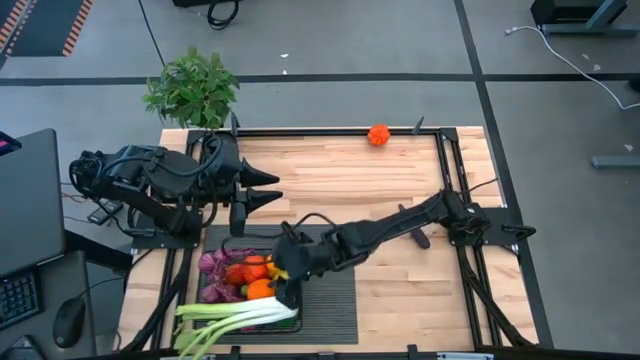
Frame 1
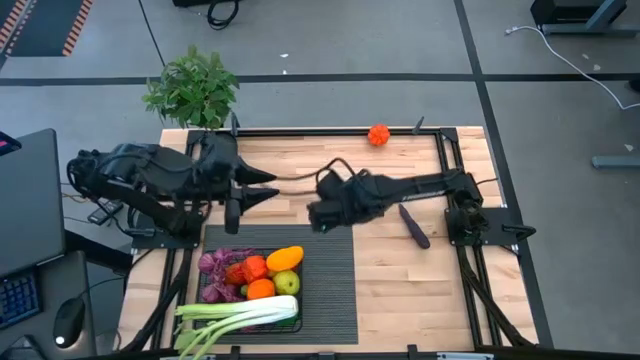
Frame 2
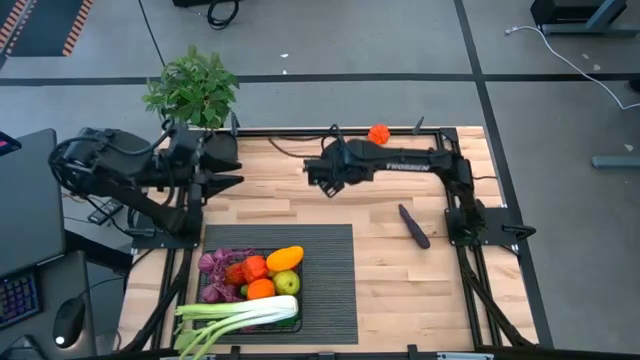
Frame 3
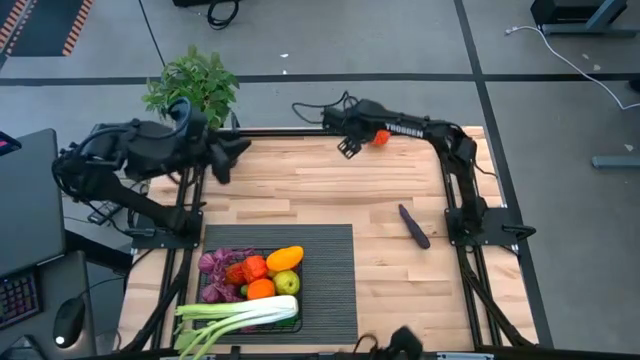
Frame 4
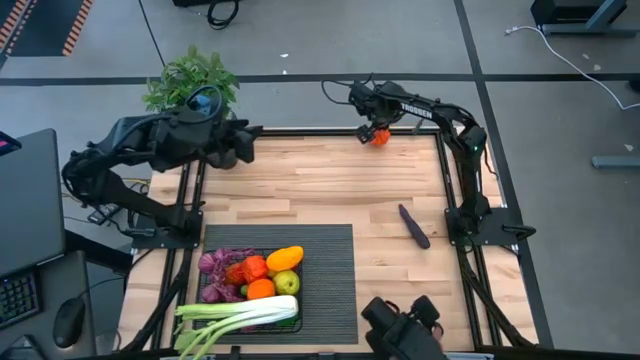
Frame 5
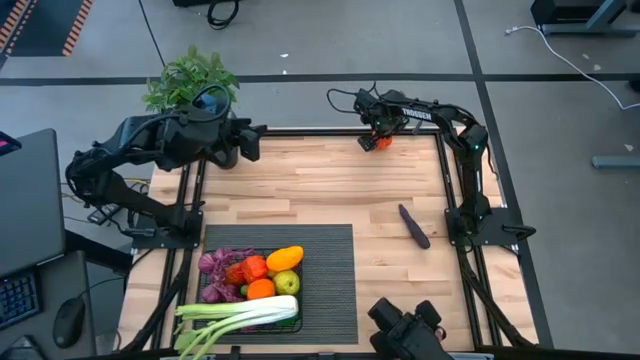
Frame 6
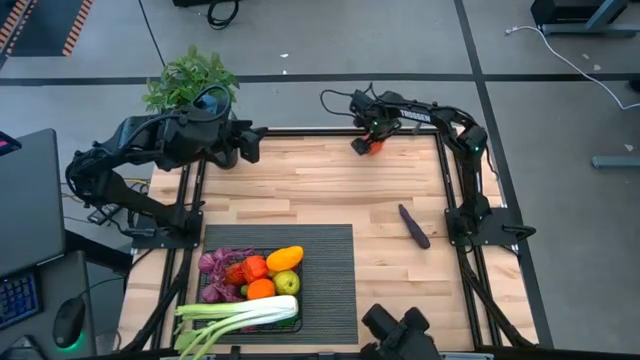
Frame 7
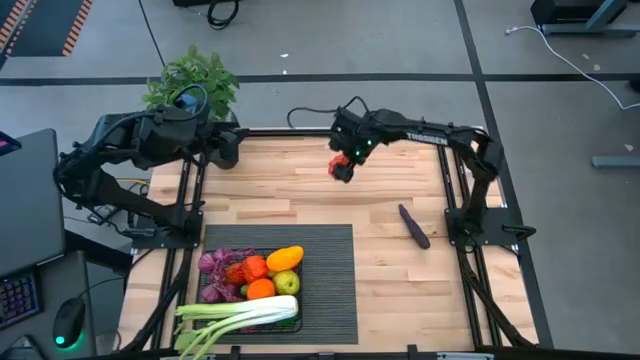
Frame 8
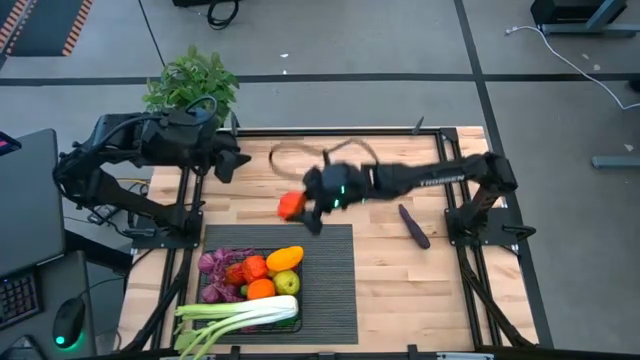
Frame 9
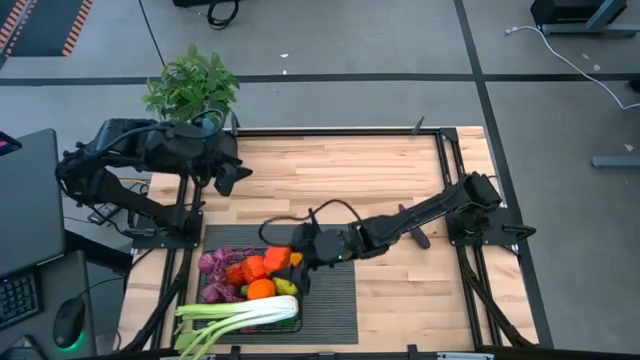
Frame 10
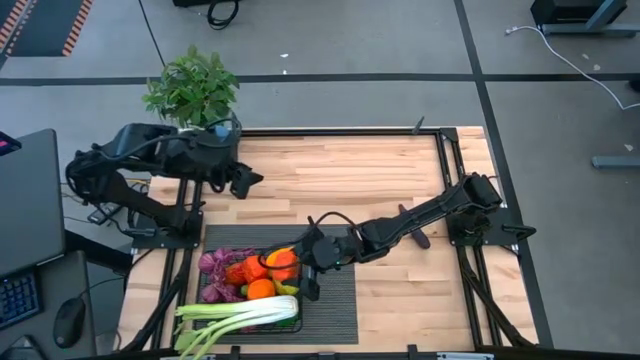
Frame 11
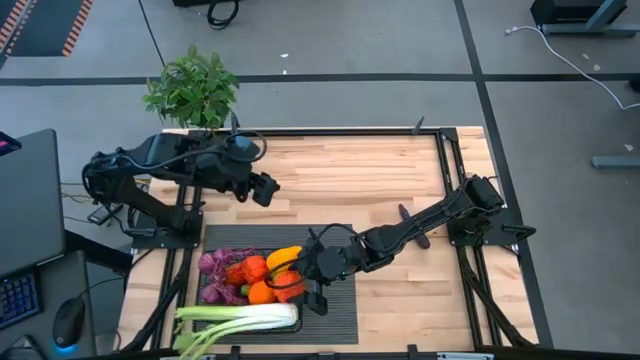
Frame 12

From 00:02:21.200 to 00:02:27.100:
Task: Build produce basket
Put the orange pumpkin into the wire basket

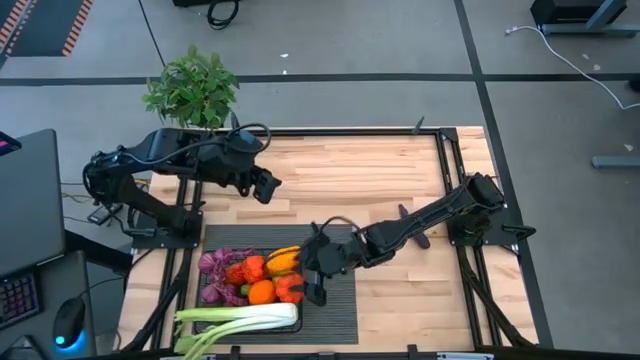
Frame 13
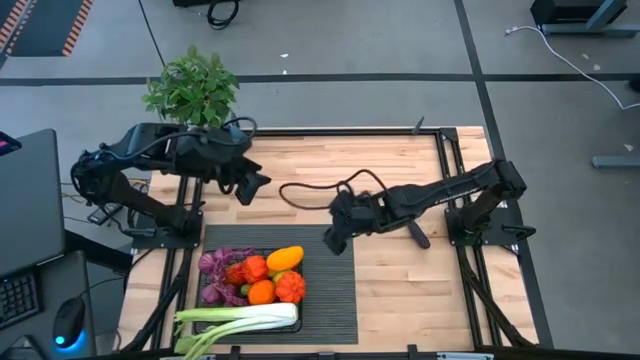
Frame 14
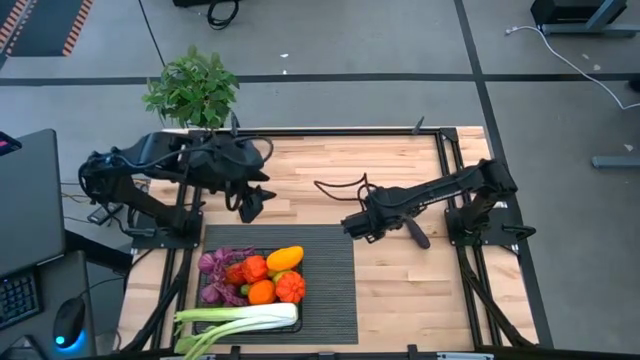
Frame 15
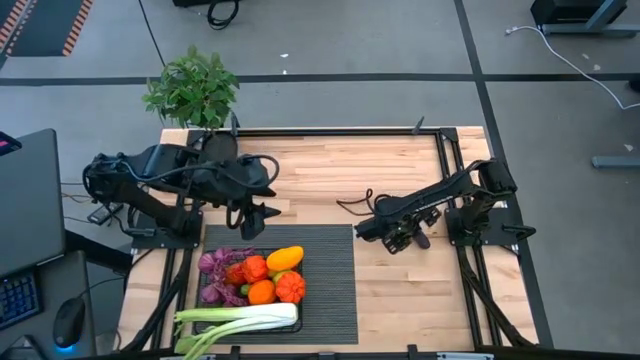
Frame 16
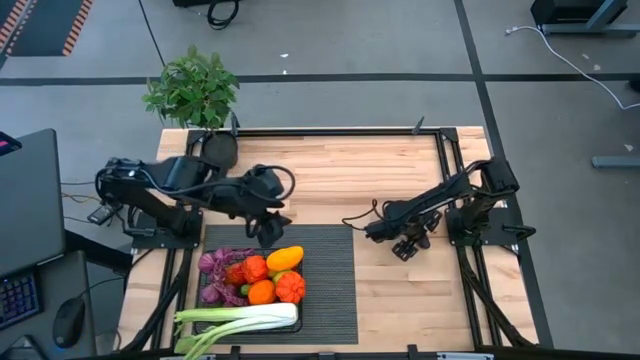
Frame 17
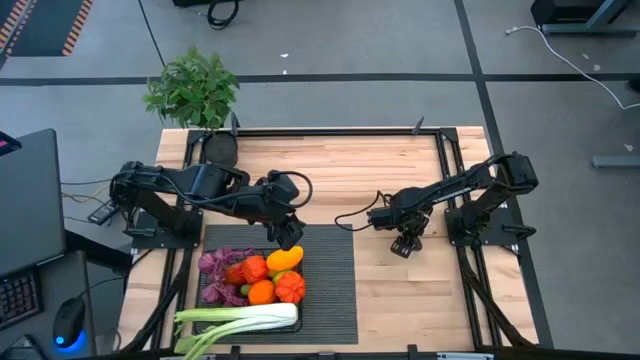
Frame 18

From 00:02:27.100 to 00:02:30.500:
Put the purple eggplant into the wire basket

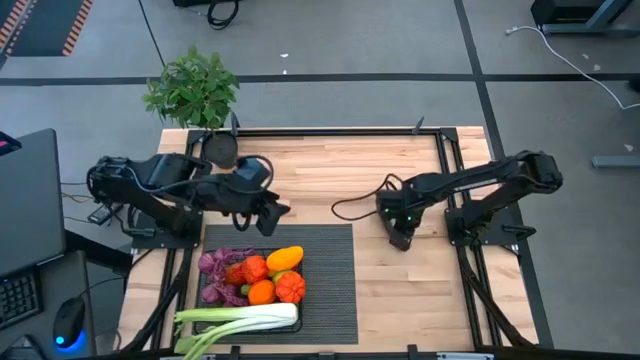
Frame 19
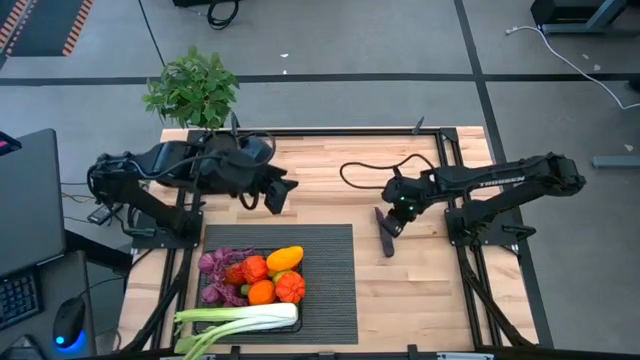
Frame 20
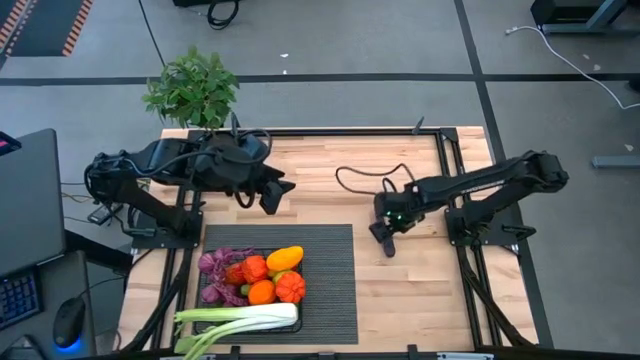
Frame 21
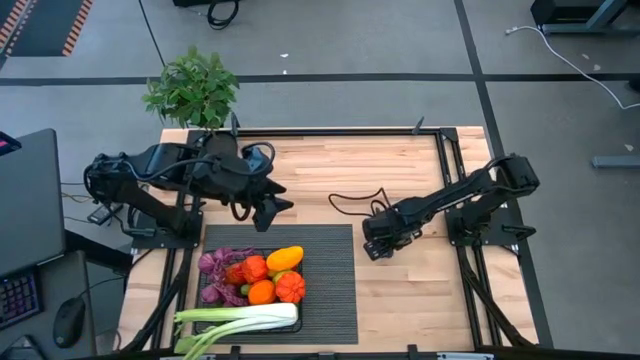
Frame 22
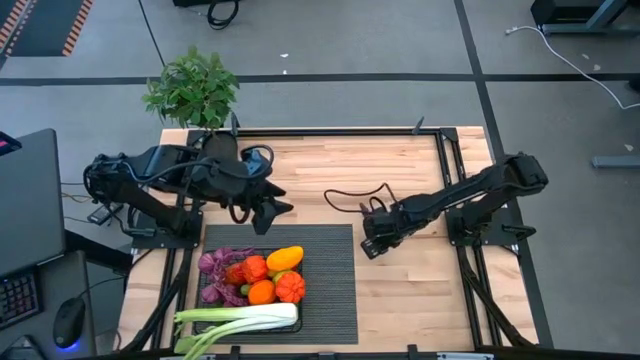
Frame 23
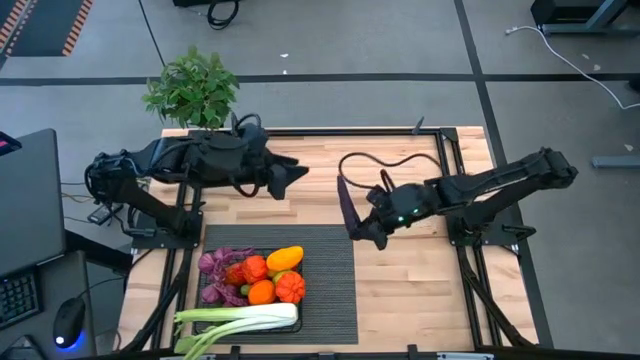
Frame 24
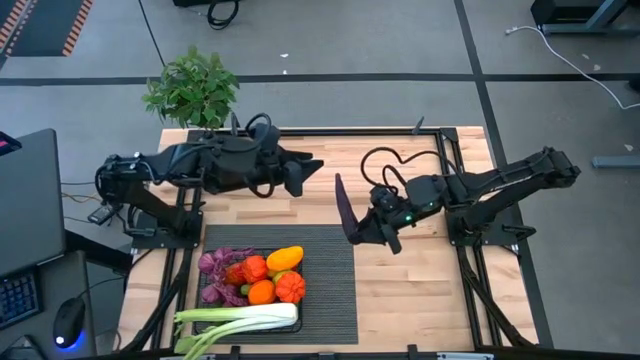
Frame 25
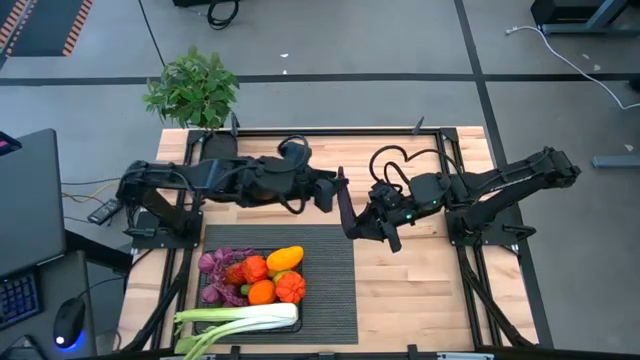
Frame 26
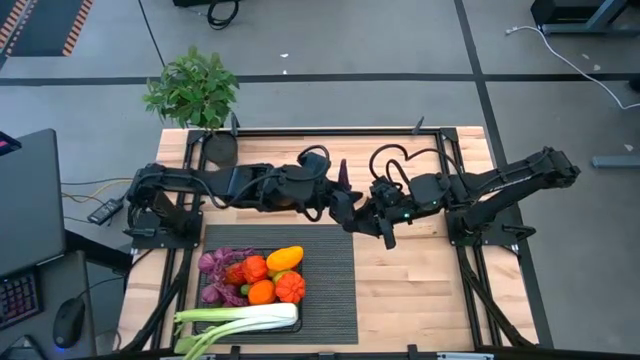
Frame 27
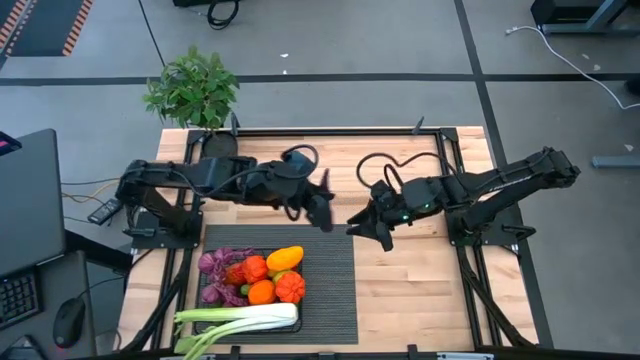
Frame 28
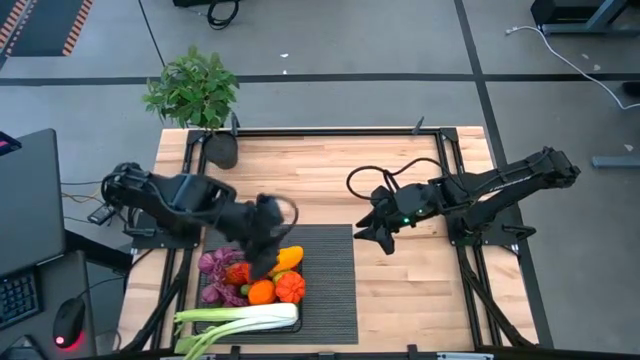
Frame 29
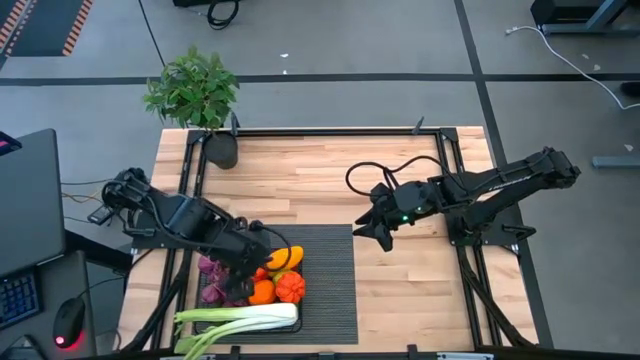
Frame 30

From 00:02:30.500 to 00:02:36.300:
Put the purple eggplant into the wire basket

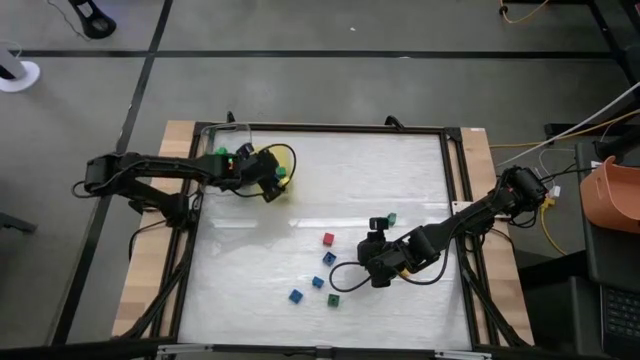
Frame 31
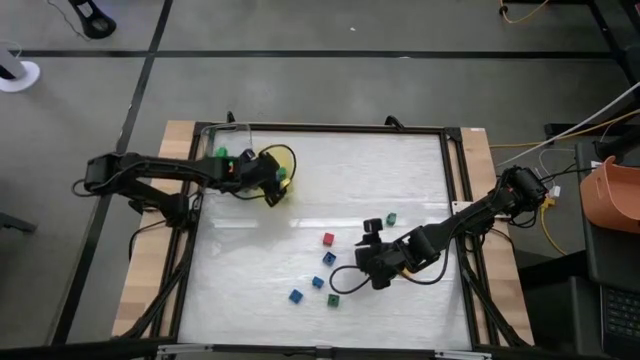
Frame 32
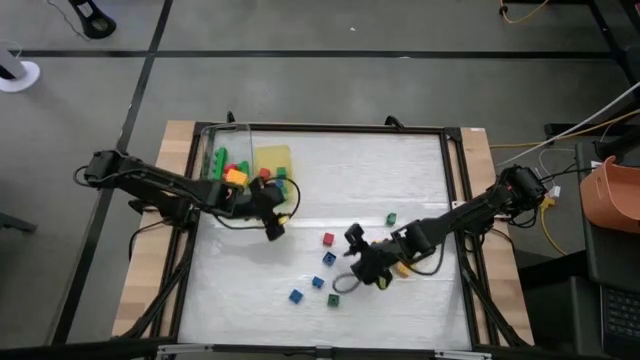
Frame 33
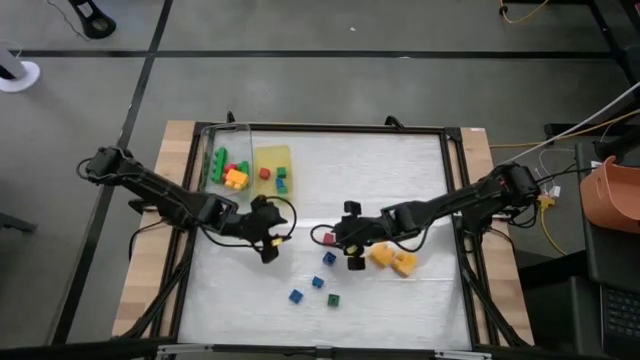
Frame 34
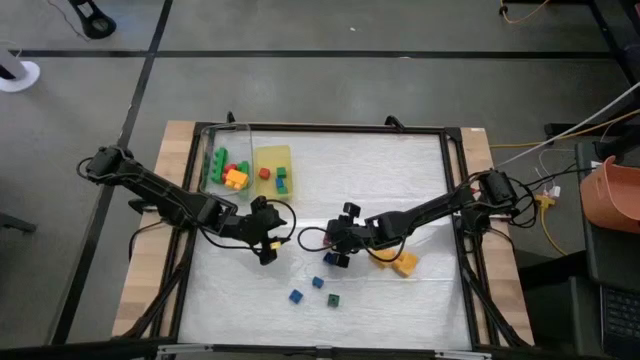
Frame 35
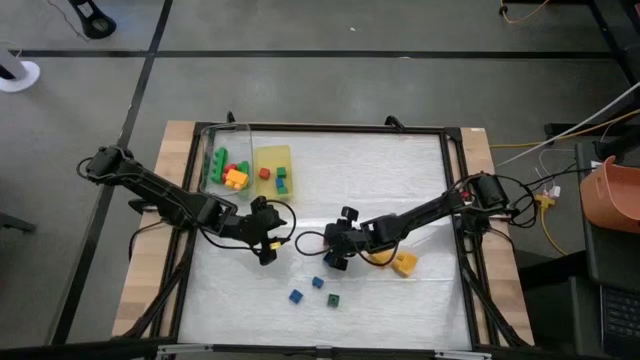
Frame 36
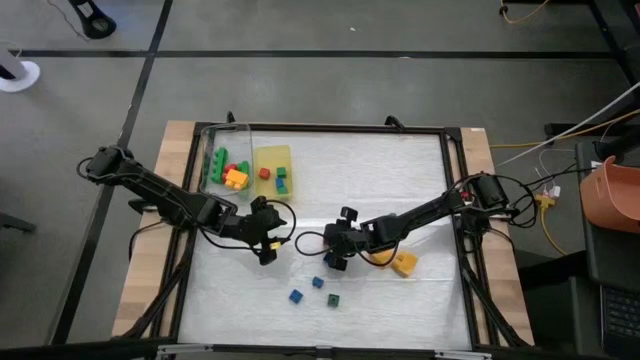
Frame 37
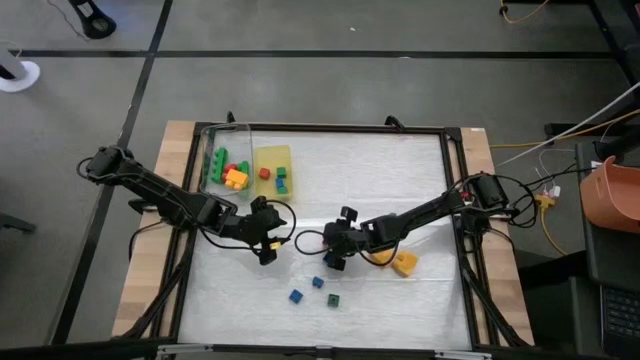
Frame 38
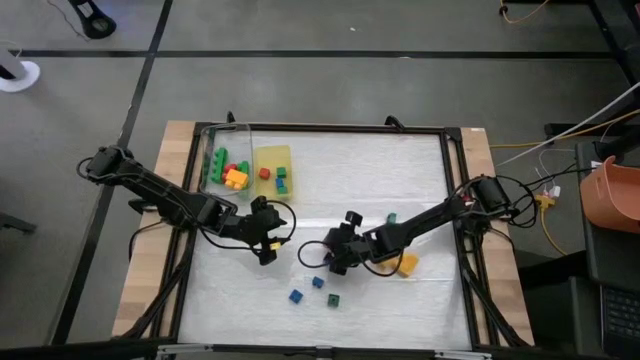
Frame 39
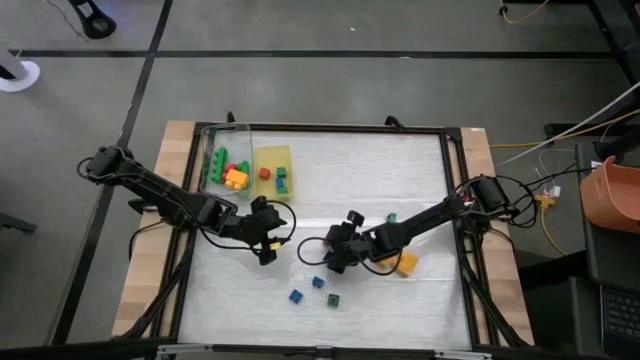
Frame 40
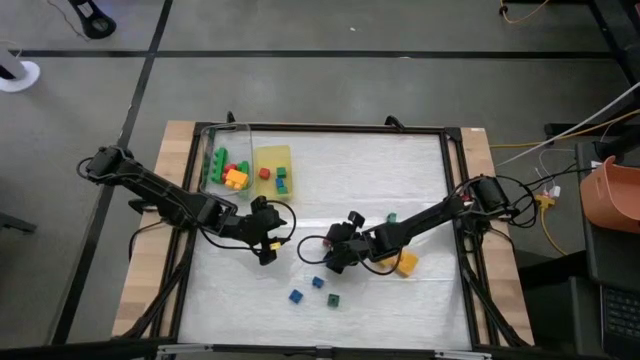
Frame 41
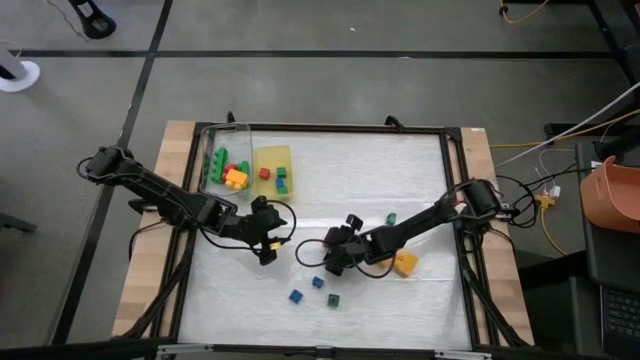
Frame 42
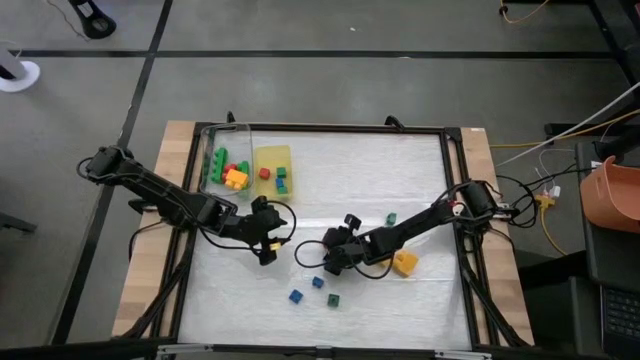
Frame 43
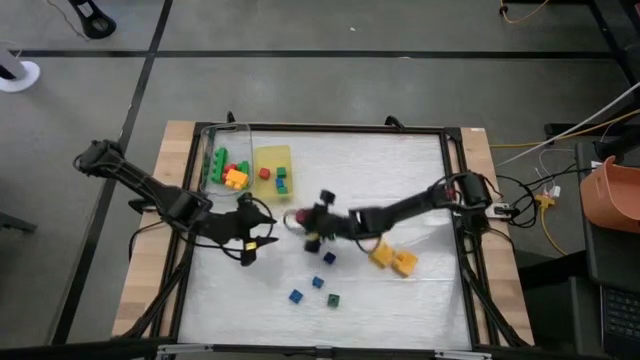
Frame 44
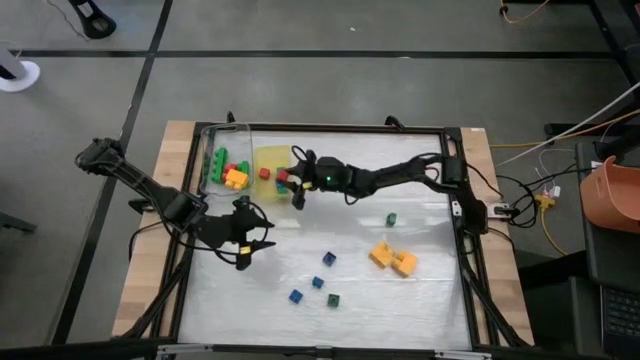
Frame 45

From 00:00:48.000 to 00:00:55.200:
Task: Sort blocks by size
Put the small red game piece into the yellow bin
